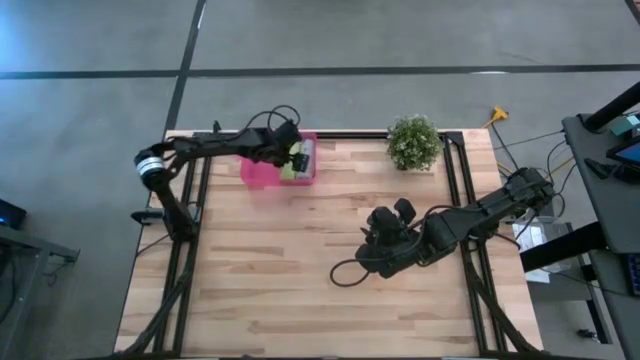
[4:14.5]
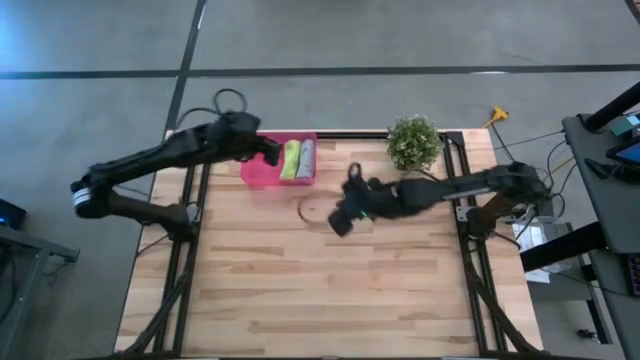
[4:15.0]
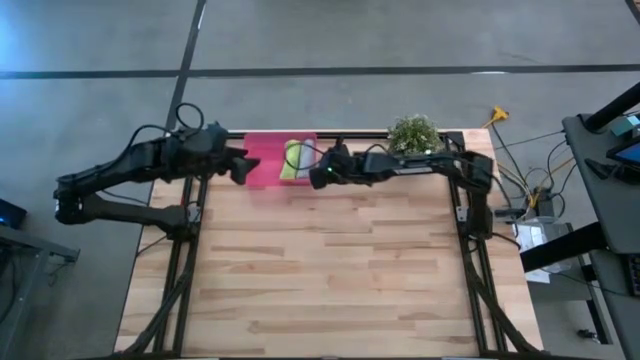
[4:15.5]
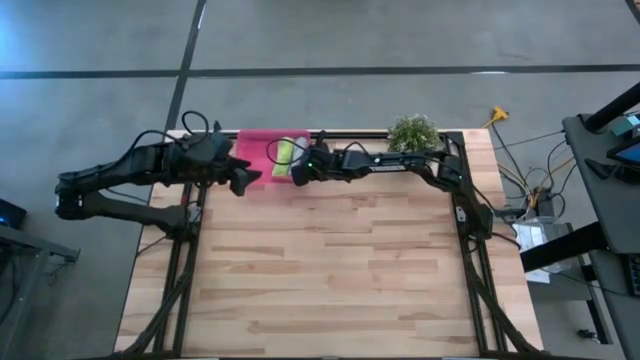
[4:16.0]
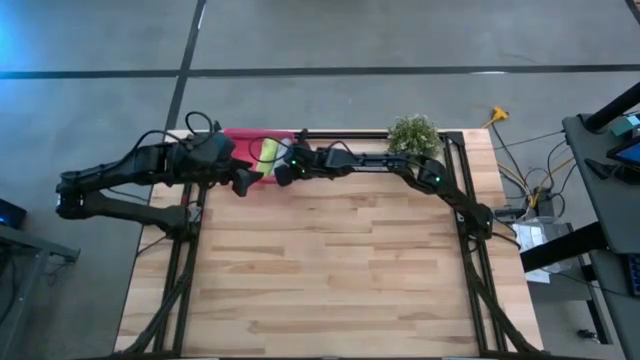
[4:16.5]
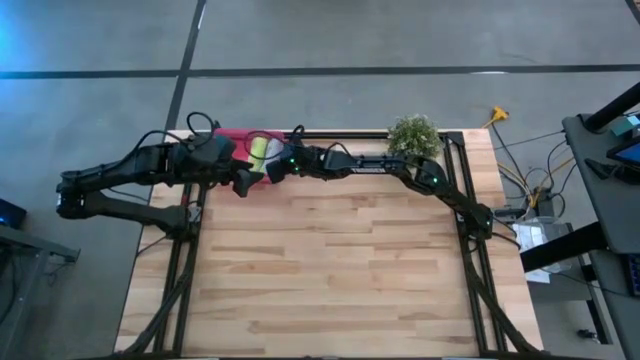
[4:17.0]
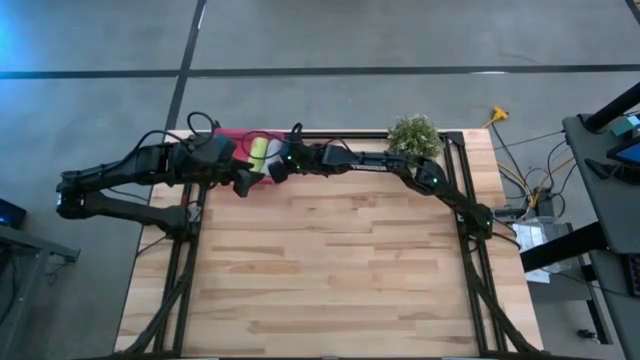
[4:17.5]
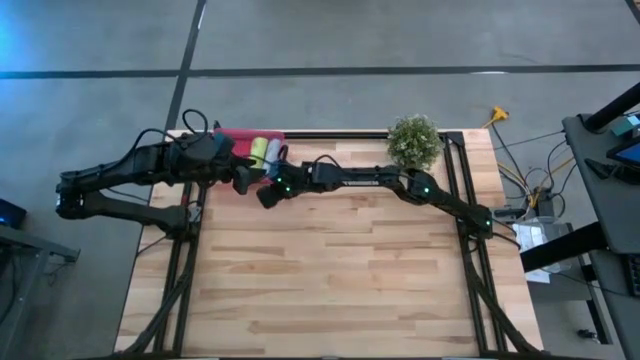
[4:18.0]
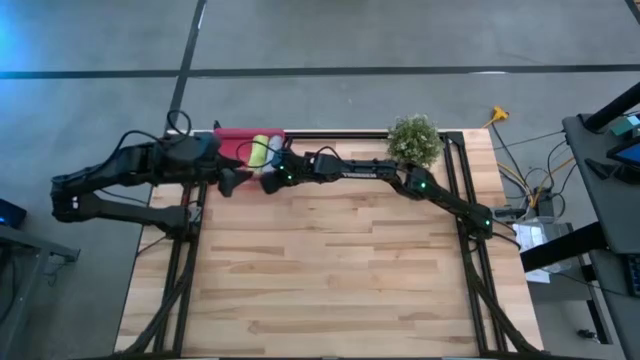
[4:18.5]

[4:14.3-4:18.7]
Task: Roll microfiber towels into tight, uniform cylinder then place into a basket
Adjust the pink bin on the top of the table

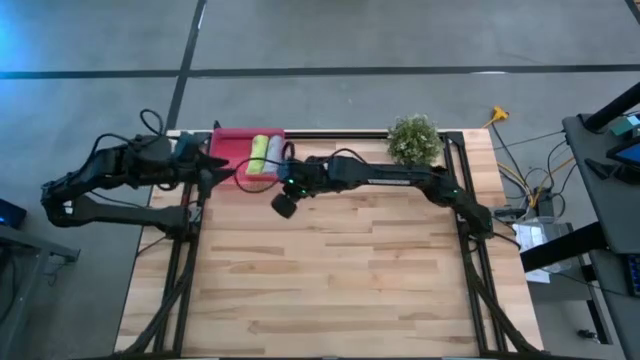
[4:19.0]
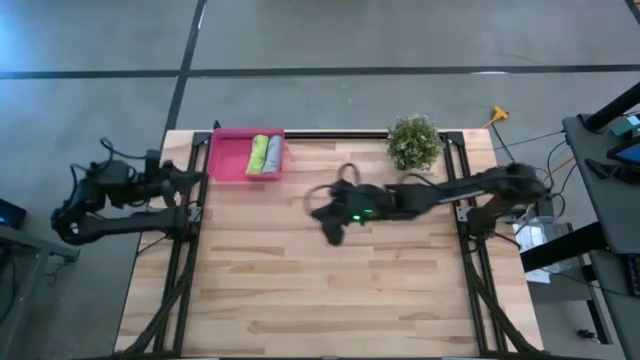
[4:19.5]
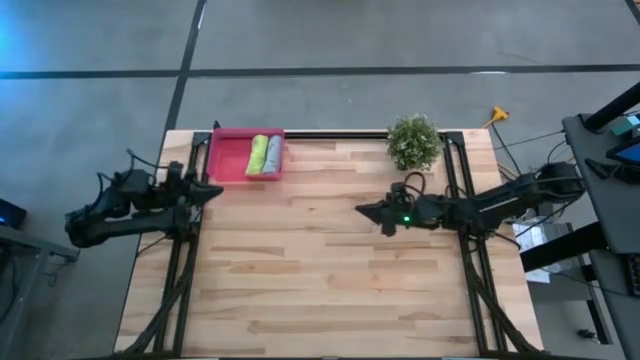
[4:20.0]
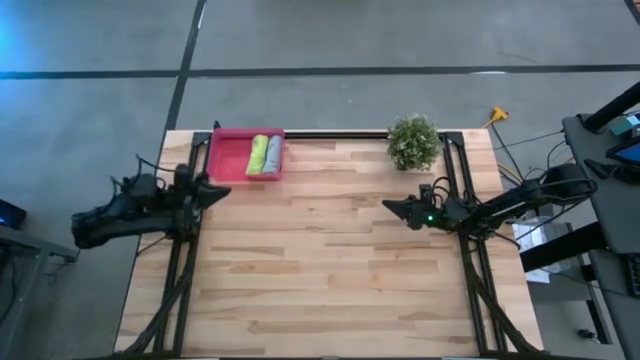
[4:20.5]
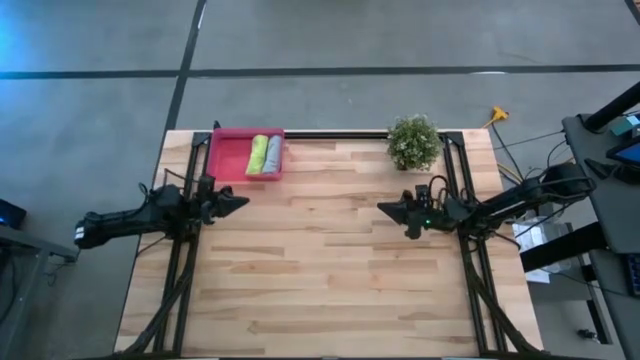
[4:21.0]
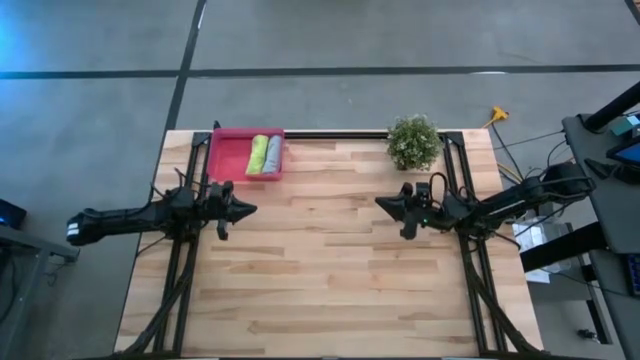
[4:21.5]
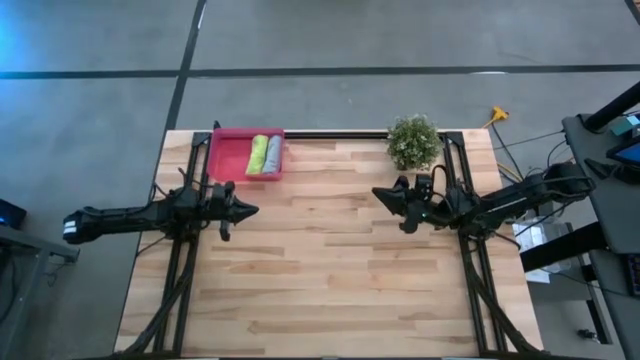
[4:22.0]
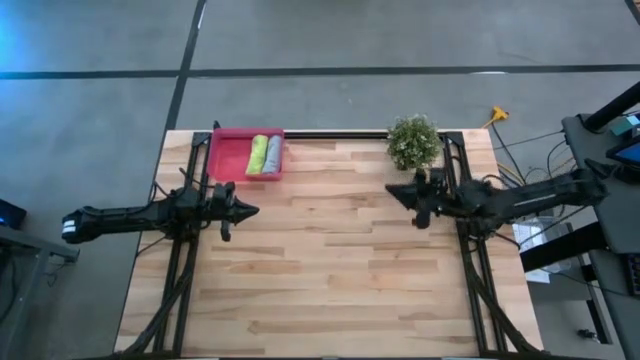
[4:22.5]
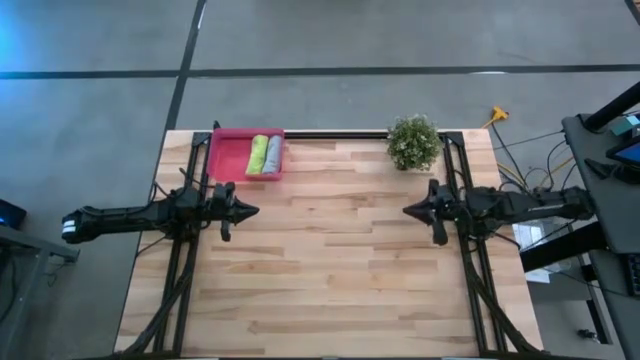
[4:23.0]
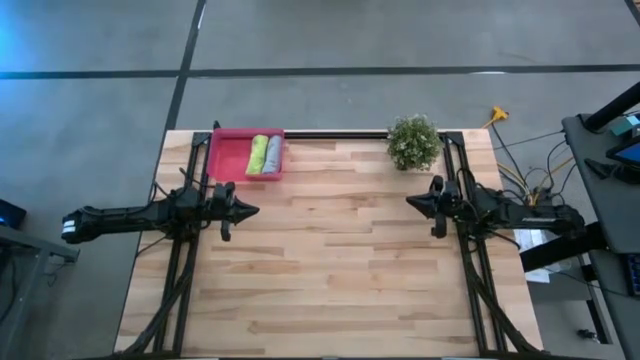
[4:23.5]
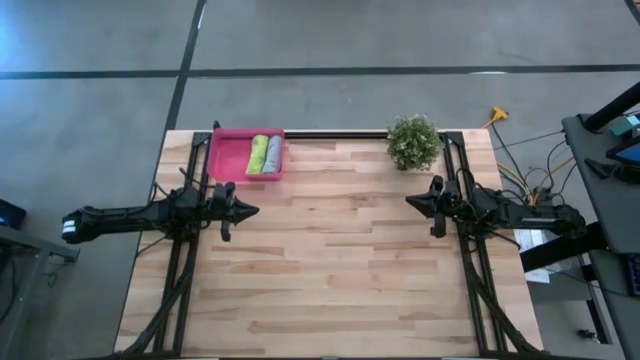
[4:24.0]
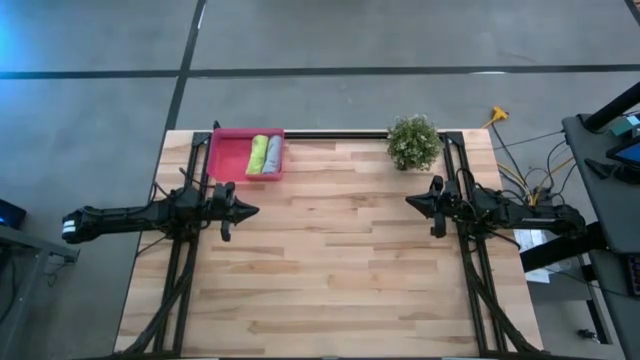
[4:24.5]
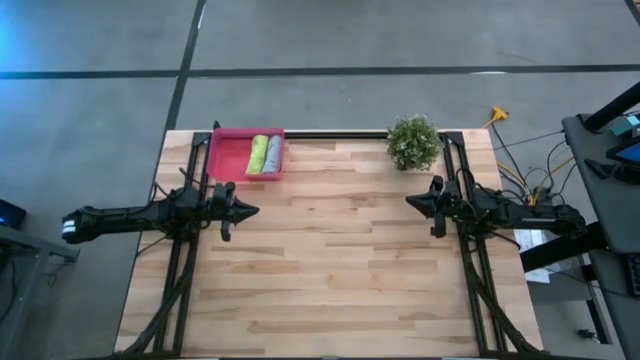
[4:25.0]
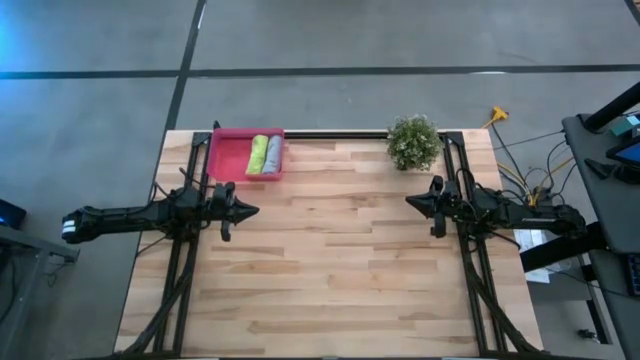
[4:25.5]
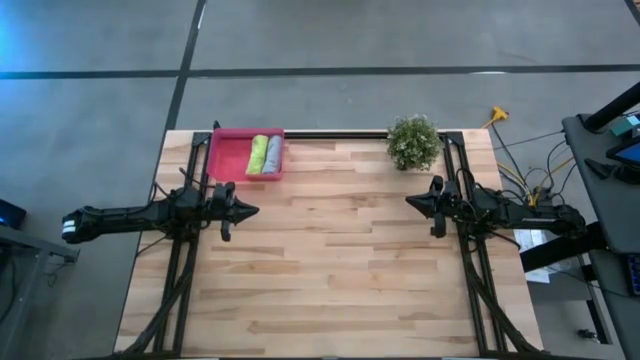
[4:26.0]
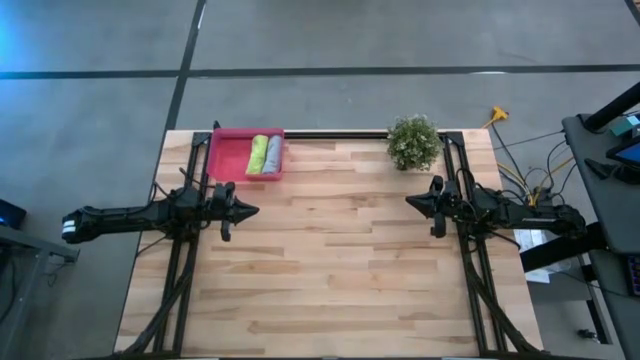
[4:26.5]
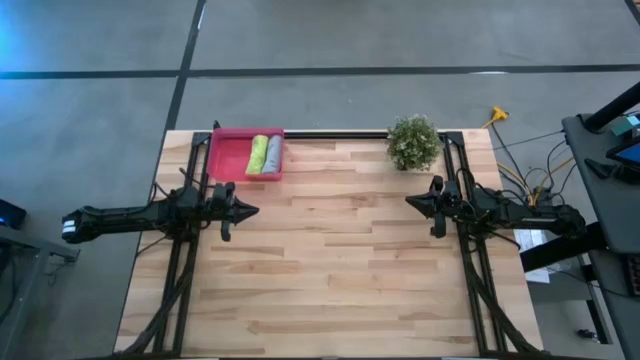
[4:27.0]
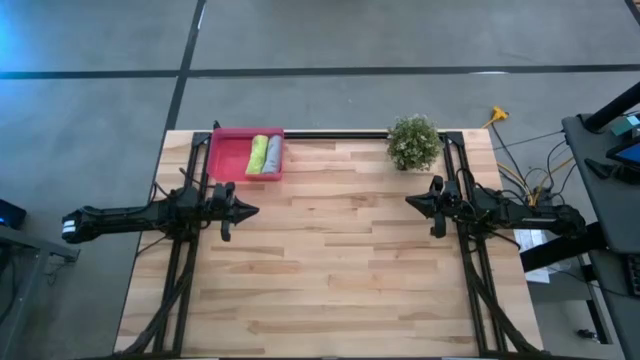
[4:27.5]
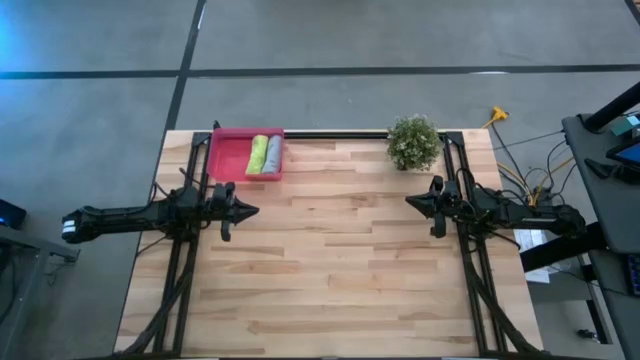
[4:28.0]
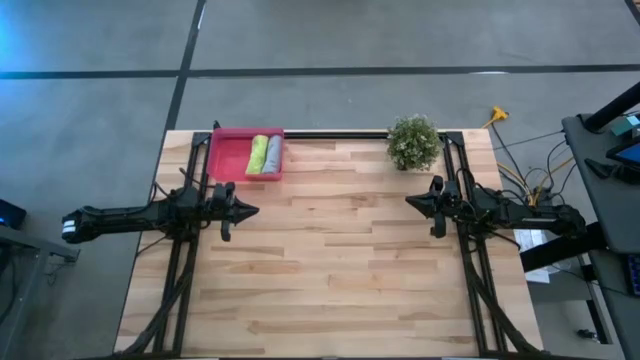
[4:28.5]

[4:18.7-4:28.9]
Return to Home Position

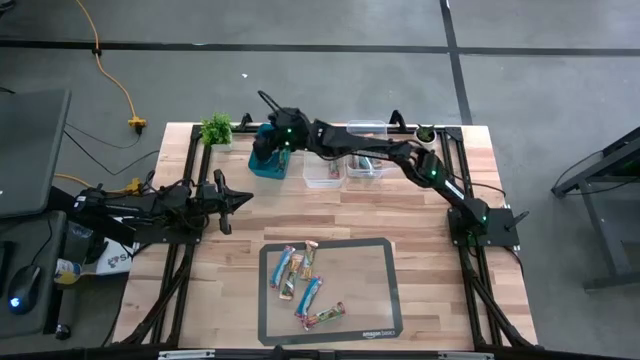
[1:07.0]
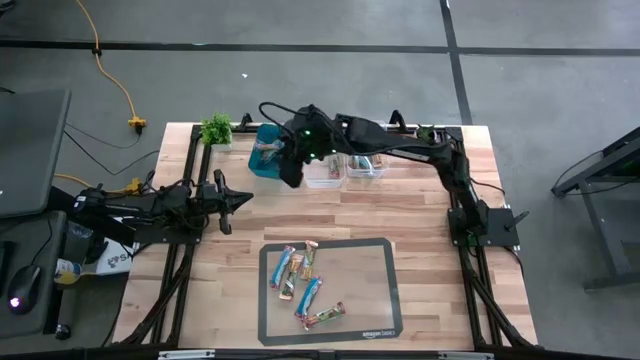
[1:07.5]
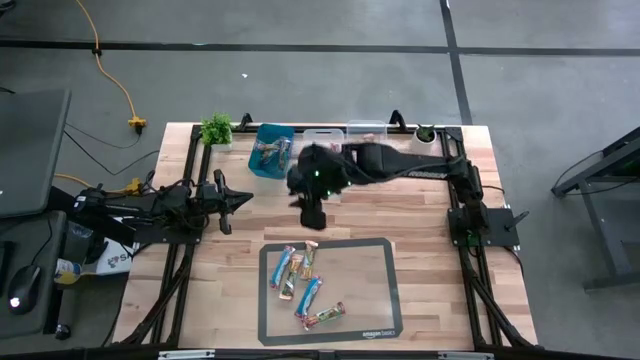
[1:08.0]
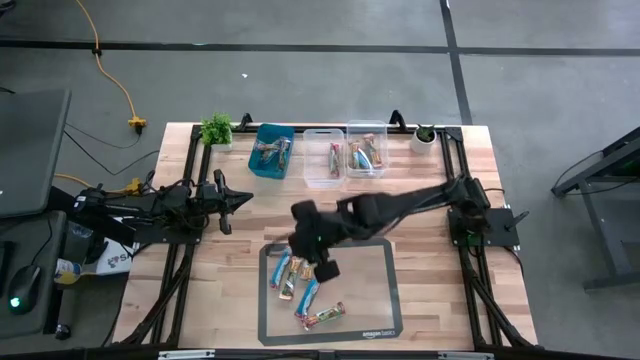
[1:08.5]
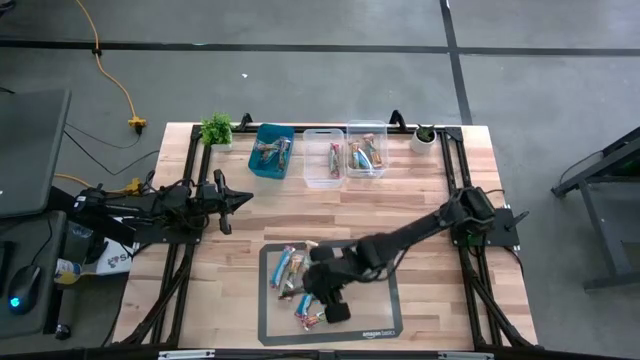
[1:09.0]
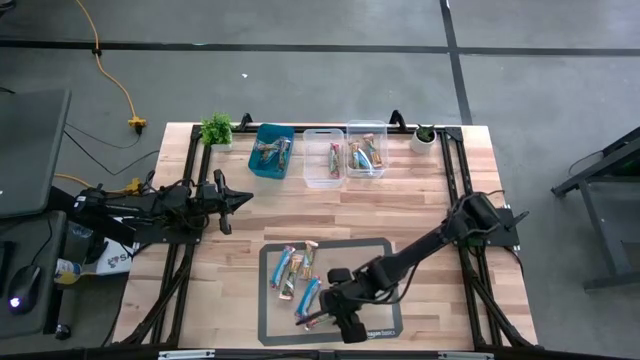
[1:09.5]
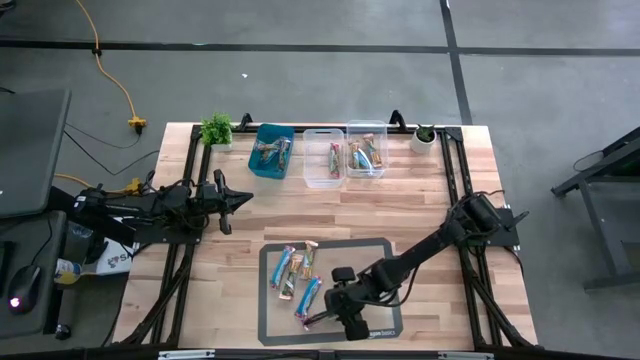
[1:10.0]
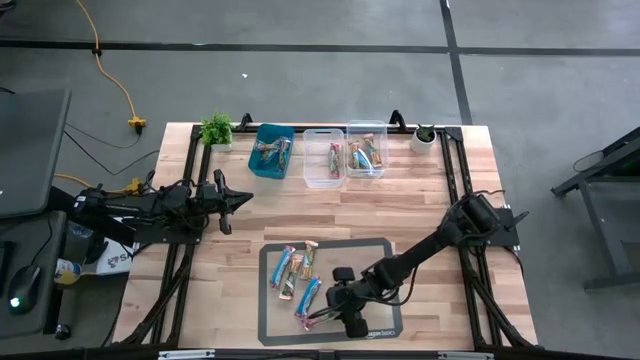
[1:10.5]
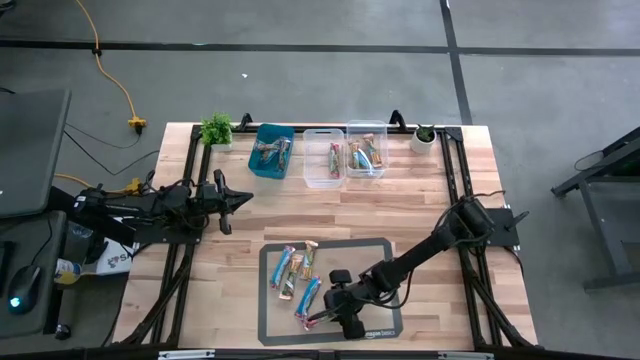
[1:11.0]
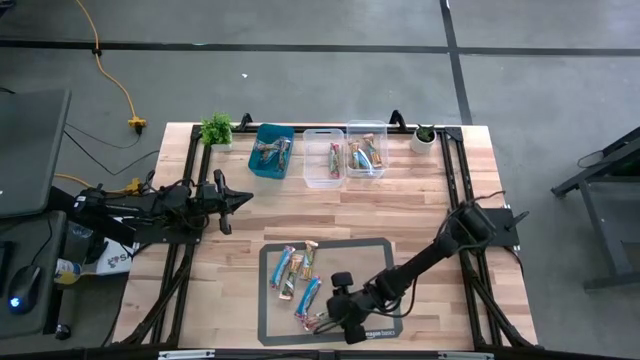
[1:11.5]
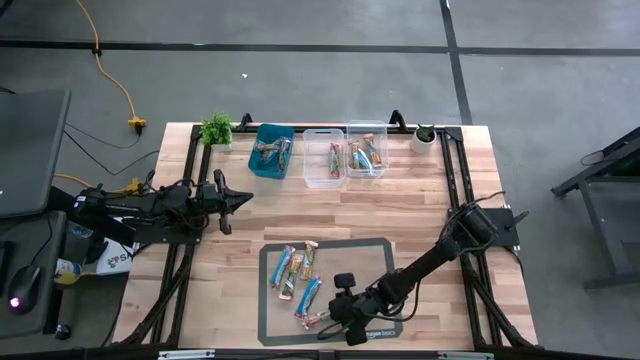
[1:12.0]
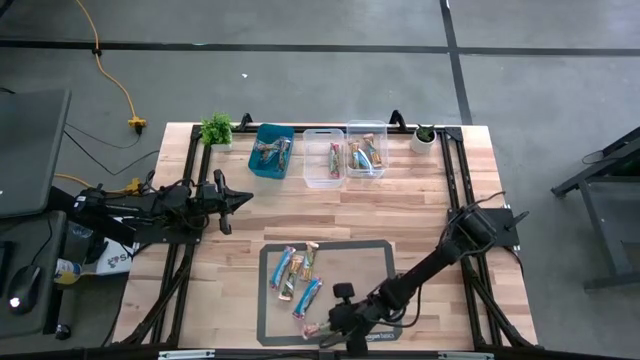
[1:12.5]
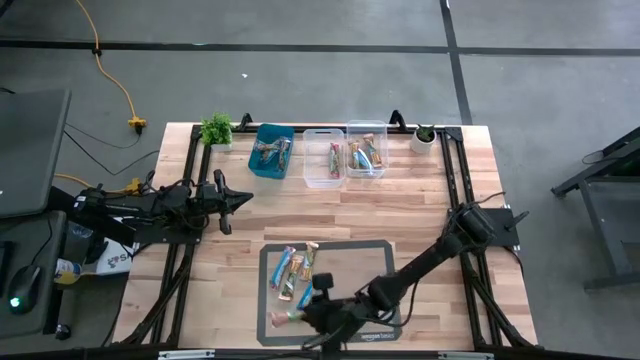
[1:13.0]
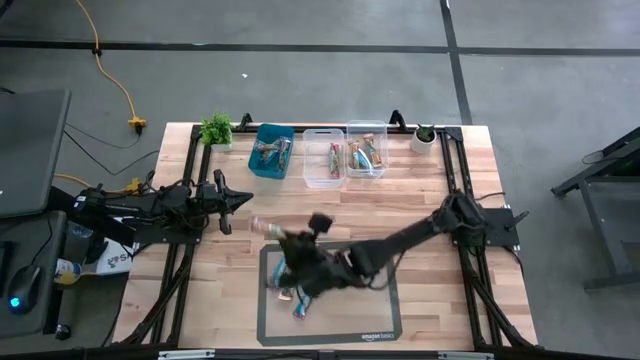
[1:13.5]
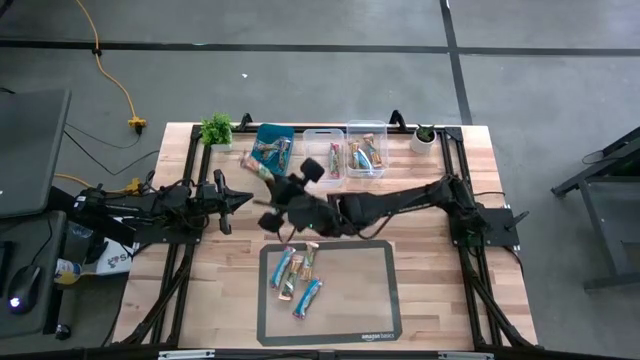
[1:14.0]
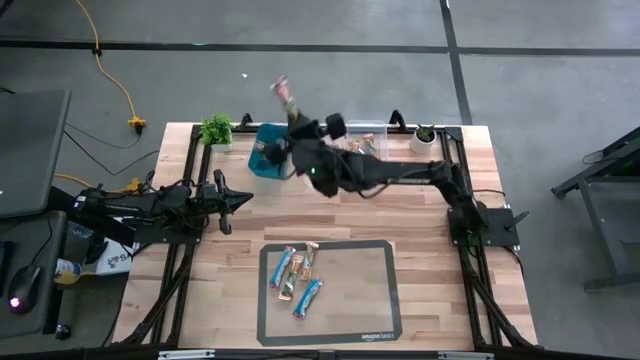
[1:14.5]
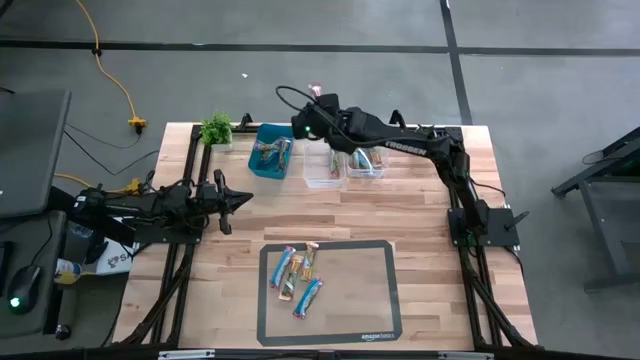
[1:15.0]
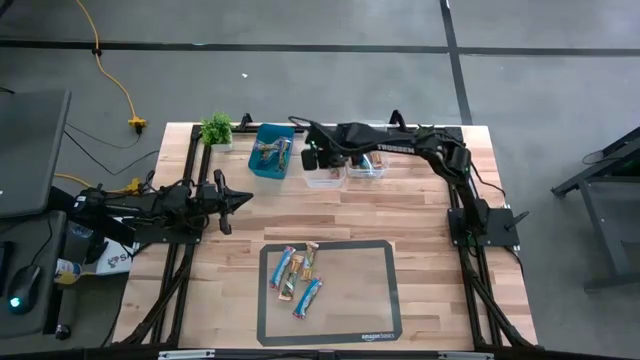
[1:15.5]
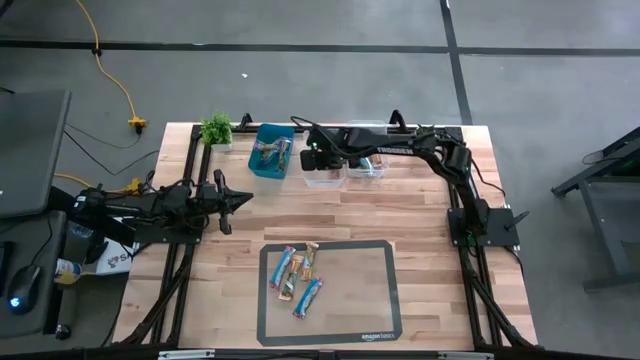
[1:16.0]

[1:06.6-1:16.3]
Task: Pick and place Granola Bars by type
Put the bottom right red granola bar into the left transparent bin
